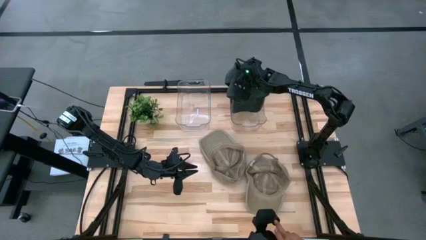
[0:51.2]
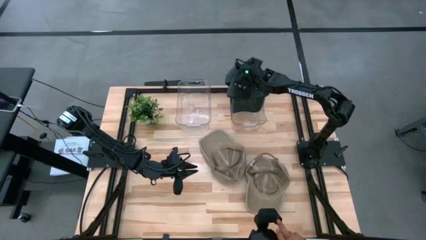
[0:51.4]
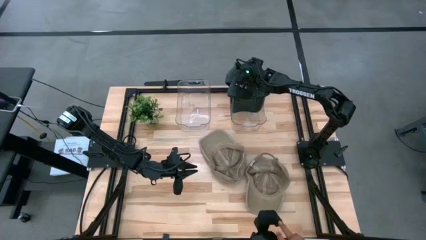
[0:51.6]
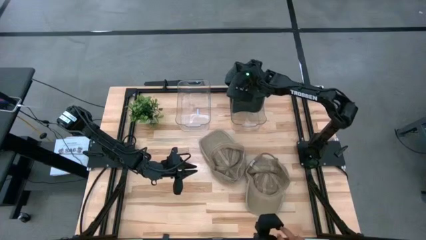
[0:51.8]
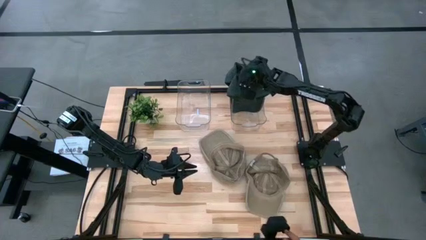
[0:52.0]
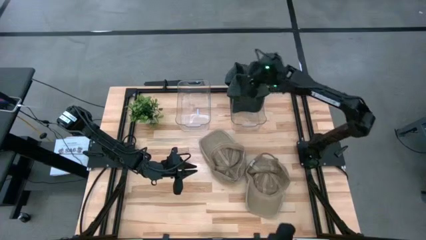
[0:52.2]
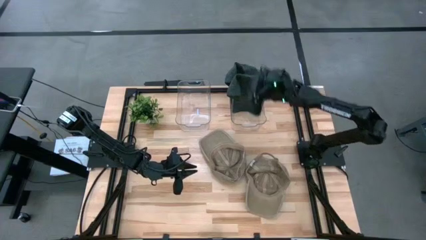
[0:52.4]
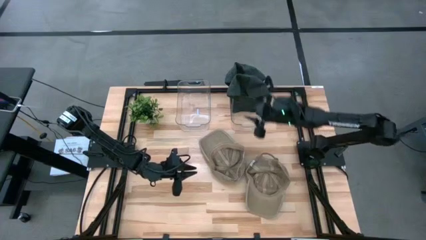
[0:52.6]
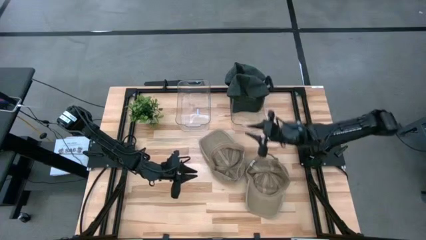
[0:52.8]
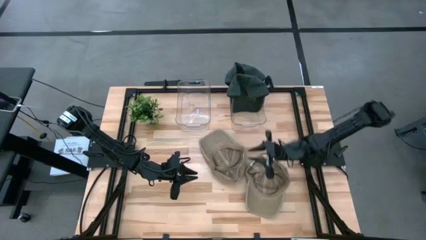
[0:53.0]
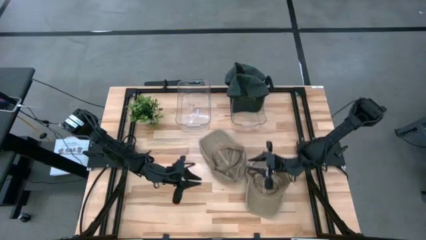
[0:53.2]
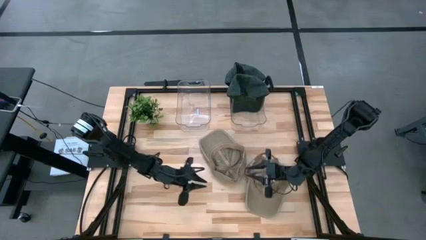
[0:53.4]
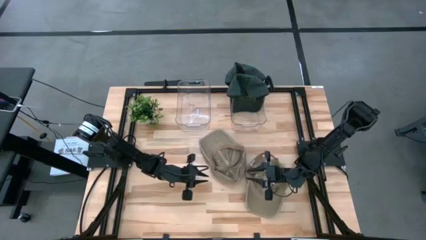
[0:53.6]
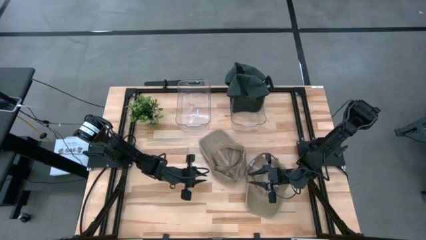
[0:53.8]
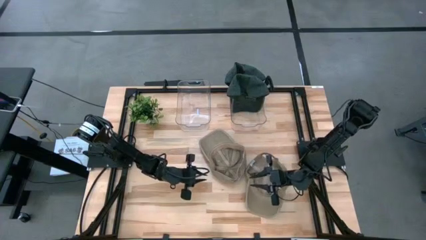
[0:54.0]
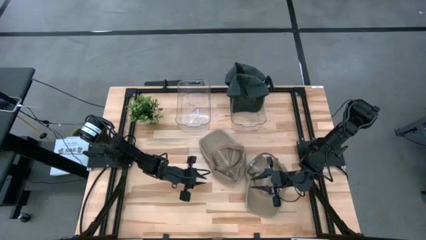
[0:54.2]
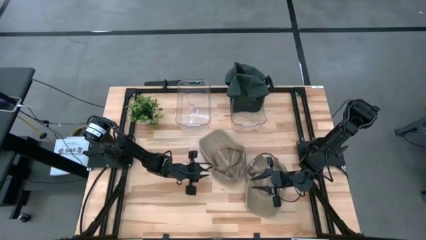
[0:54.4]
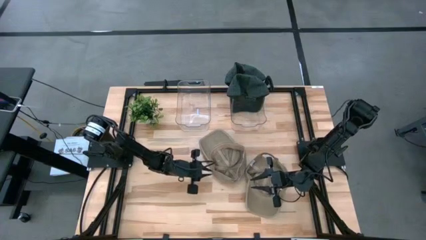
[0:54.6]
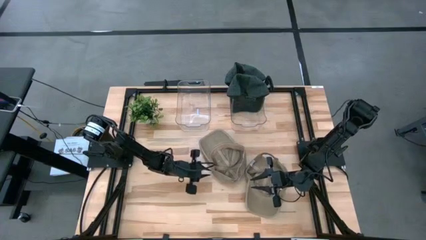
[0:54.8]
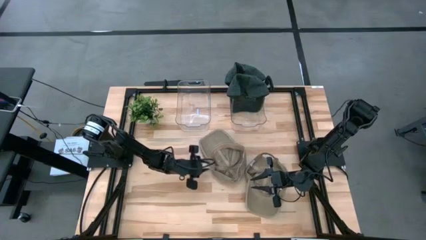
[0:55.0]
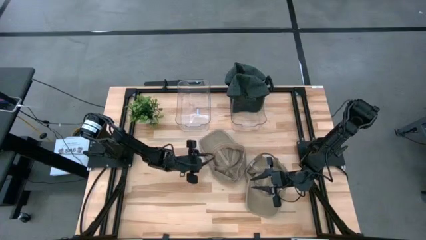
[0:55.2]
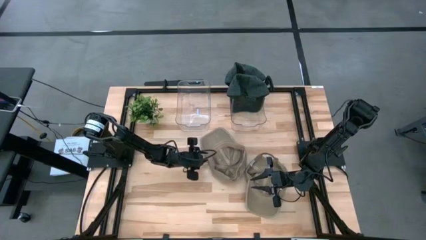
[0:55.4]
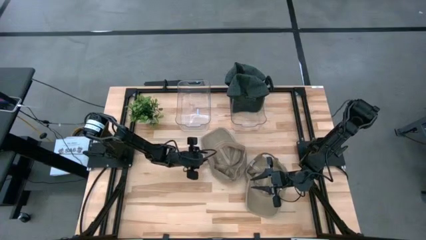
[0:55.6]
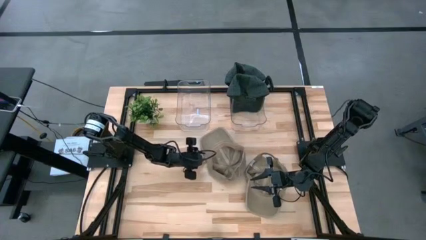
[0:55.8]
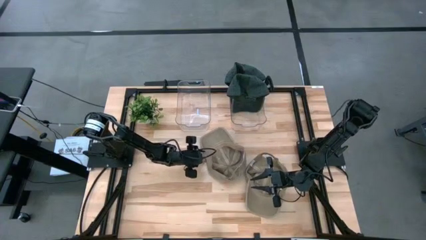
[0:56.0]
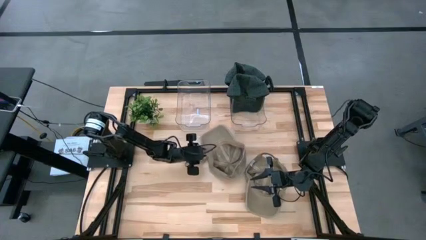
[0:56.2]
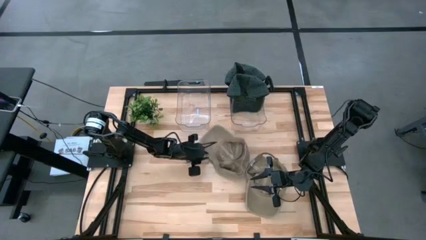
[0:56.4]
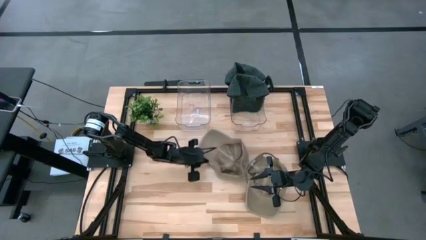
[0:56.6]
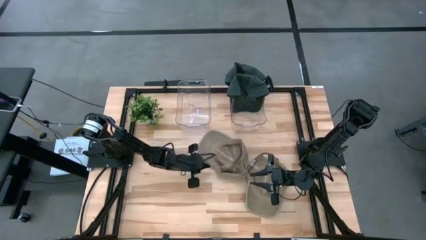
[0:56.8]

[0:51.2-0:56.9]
Task: Pick & Place hat
Put the left brown cap into the left transparent bin

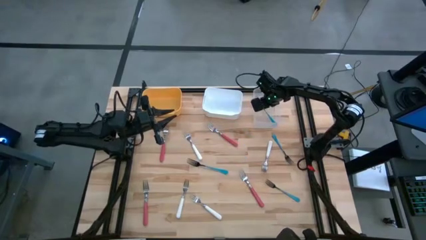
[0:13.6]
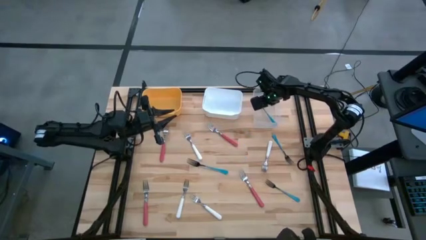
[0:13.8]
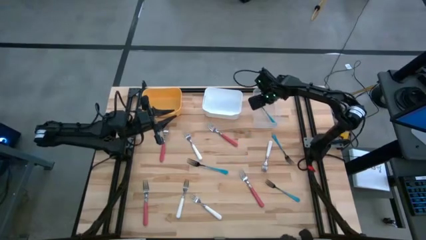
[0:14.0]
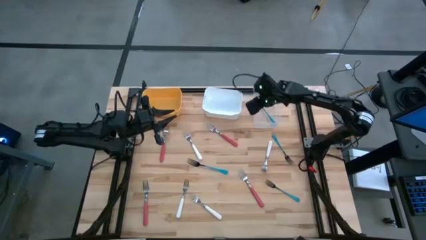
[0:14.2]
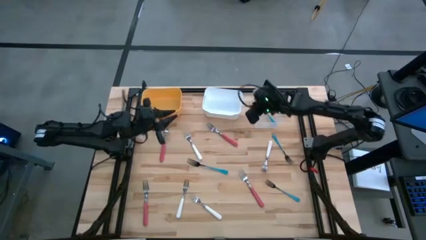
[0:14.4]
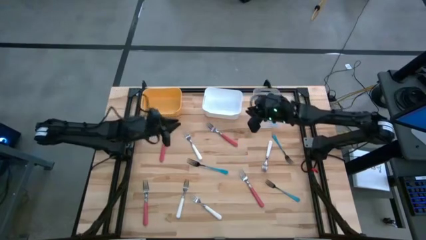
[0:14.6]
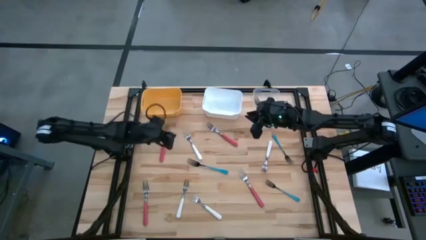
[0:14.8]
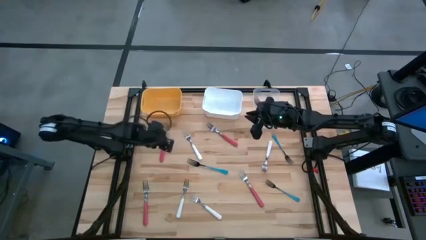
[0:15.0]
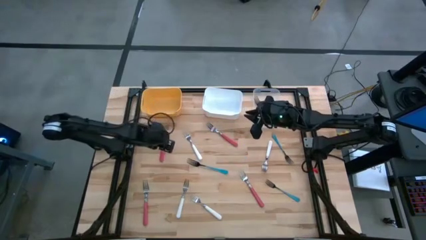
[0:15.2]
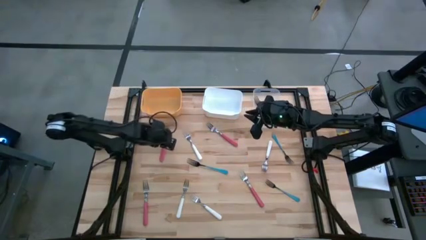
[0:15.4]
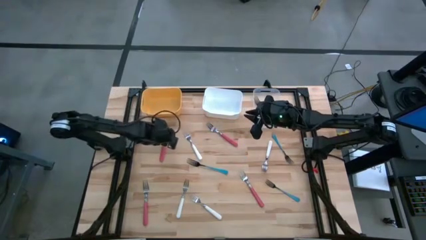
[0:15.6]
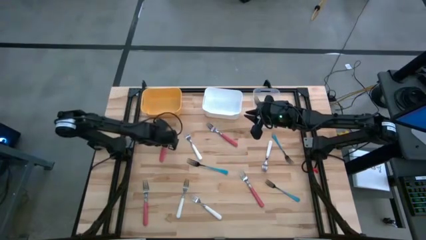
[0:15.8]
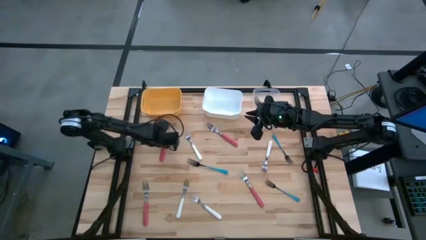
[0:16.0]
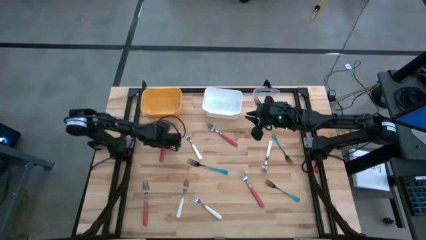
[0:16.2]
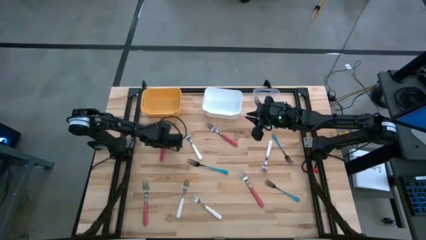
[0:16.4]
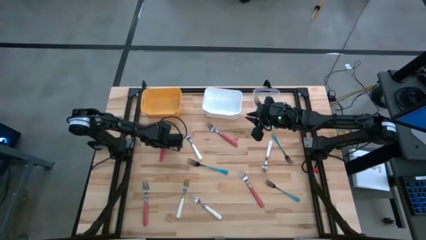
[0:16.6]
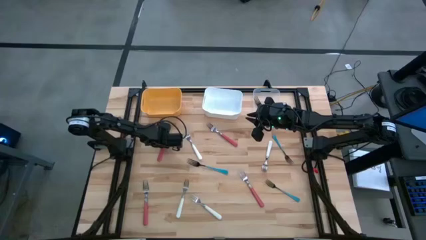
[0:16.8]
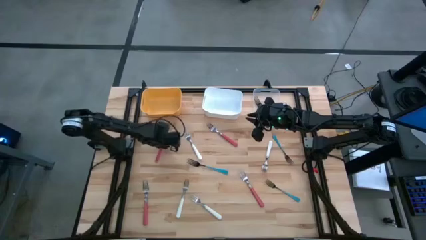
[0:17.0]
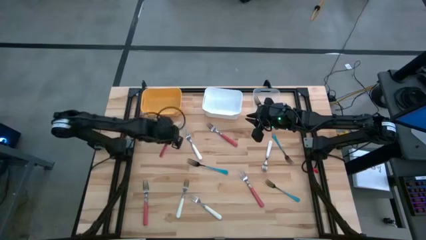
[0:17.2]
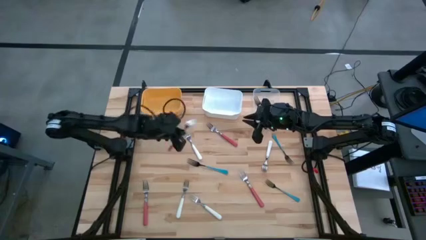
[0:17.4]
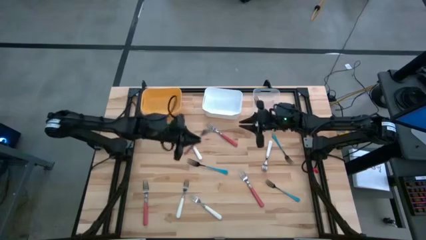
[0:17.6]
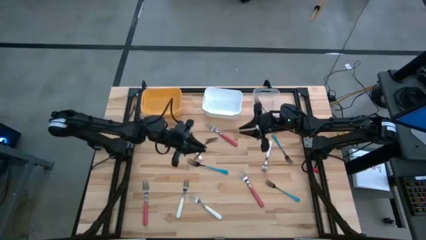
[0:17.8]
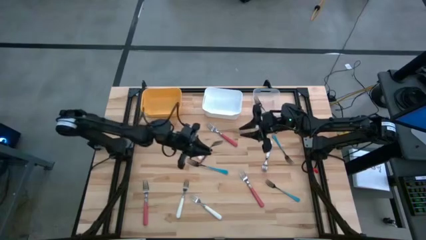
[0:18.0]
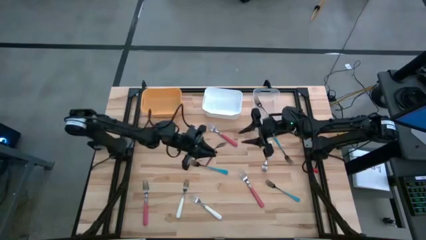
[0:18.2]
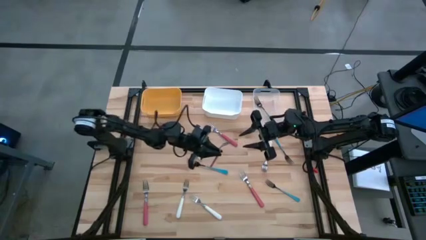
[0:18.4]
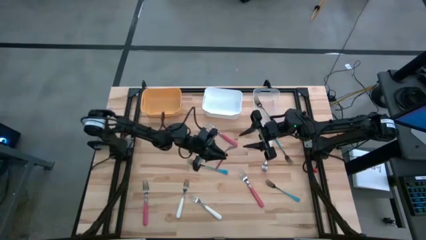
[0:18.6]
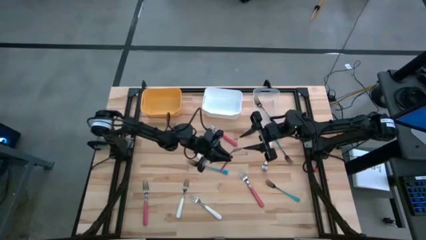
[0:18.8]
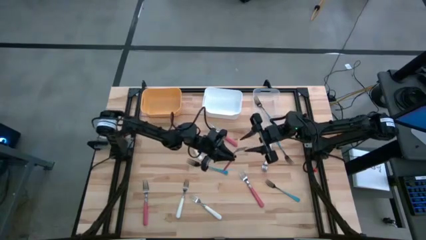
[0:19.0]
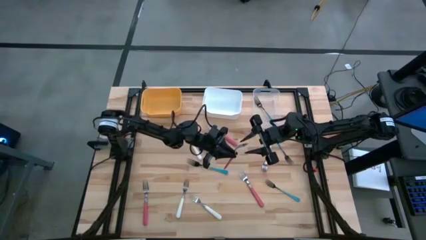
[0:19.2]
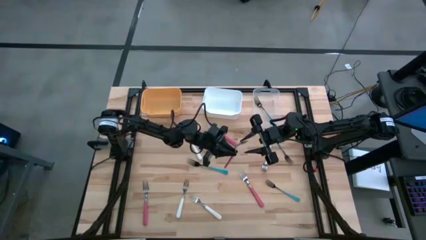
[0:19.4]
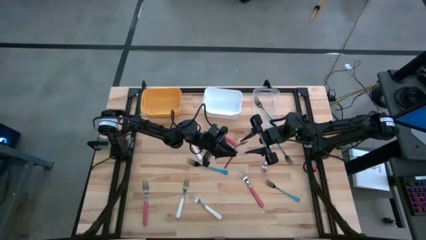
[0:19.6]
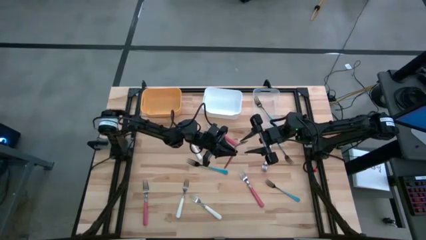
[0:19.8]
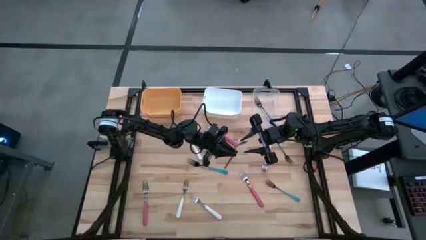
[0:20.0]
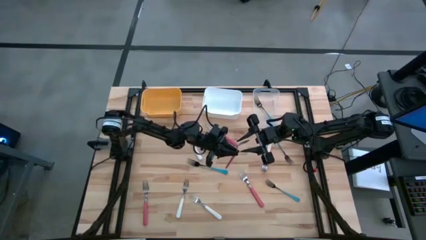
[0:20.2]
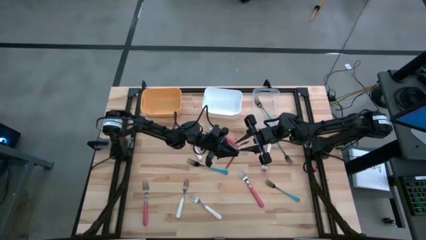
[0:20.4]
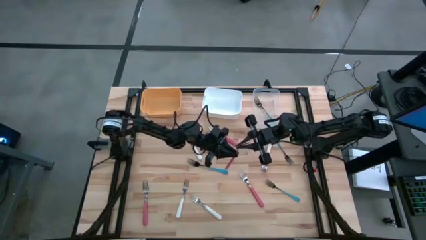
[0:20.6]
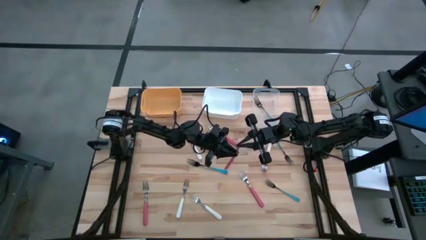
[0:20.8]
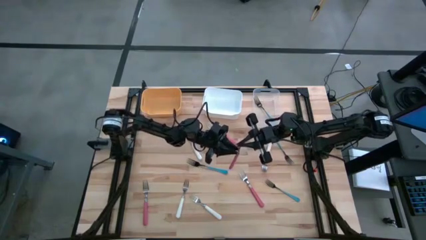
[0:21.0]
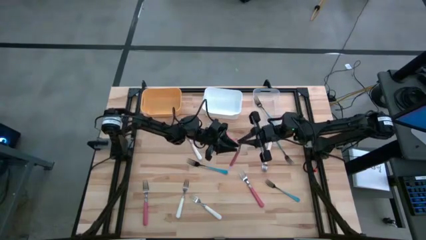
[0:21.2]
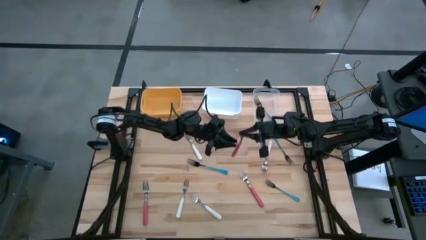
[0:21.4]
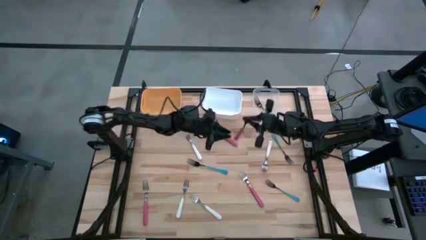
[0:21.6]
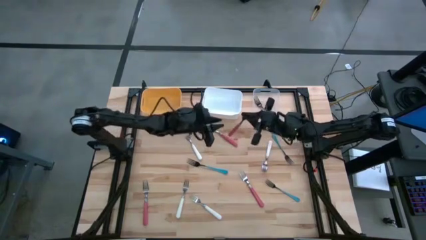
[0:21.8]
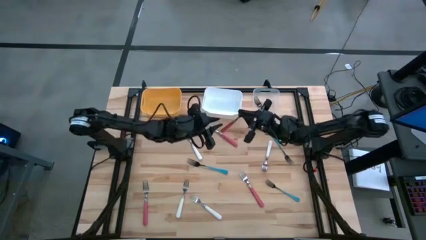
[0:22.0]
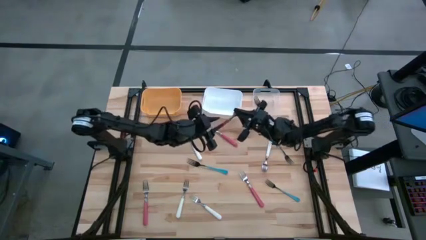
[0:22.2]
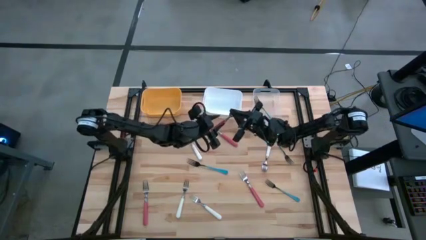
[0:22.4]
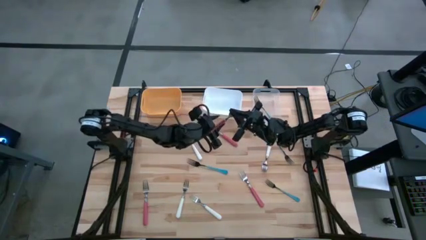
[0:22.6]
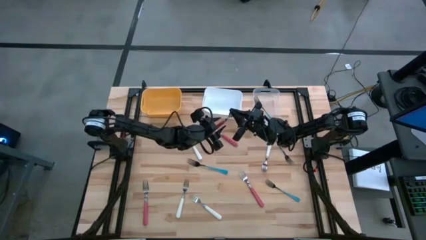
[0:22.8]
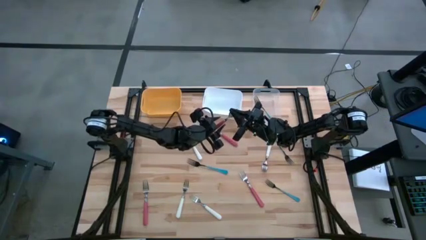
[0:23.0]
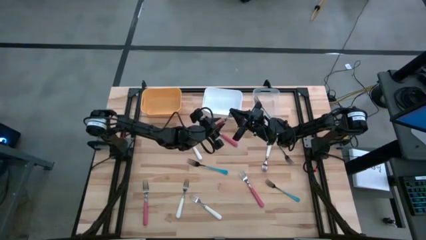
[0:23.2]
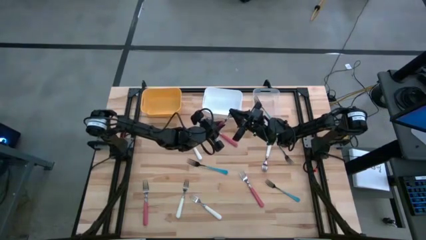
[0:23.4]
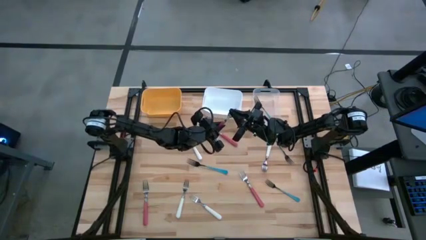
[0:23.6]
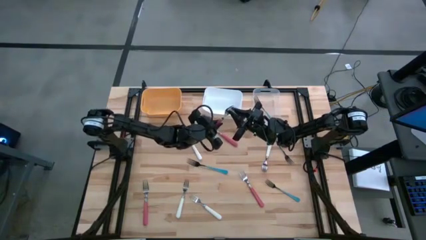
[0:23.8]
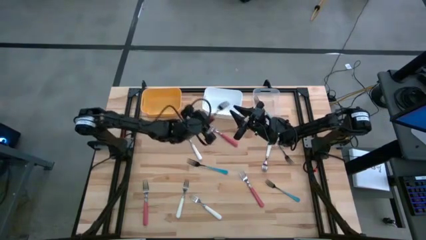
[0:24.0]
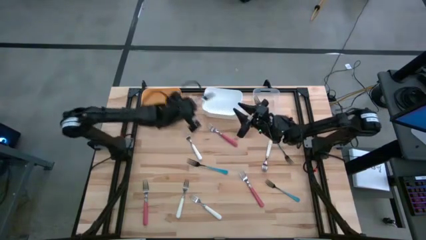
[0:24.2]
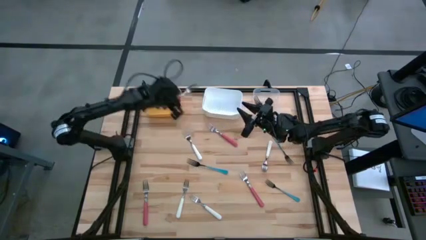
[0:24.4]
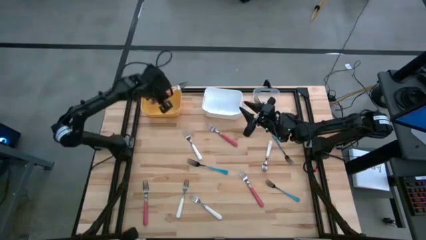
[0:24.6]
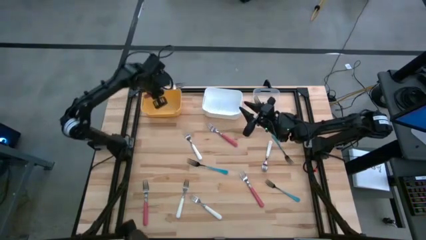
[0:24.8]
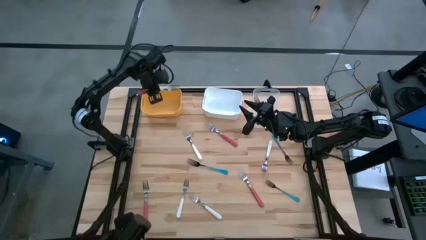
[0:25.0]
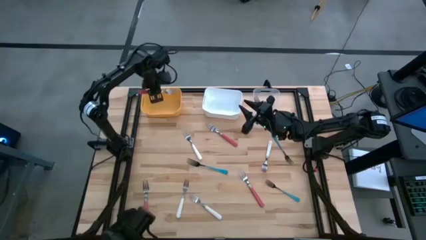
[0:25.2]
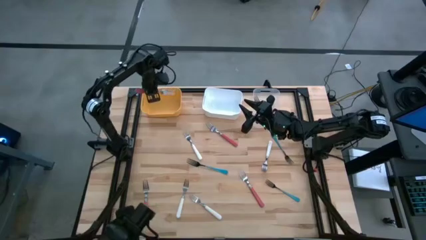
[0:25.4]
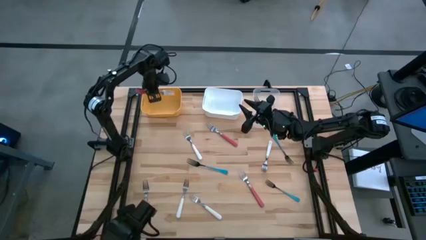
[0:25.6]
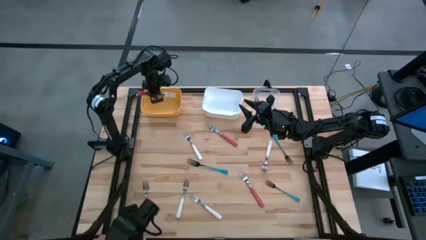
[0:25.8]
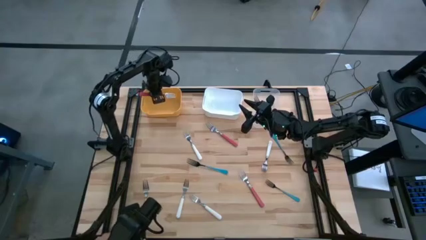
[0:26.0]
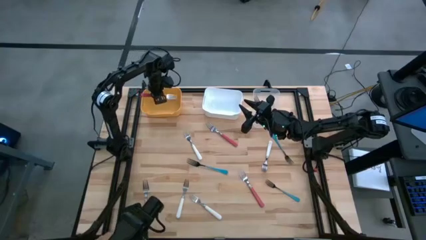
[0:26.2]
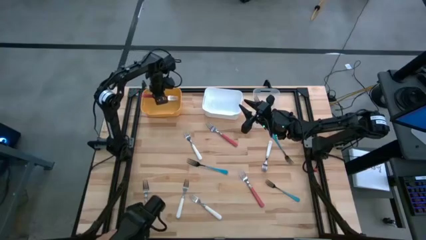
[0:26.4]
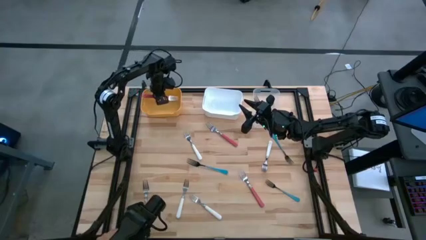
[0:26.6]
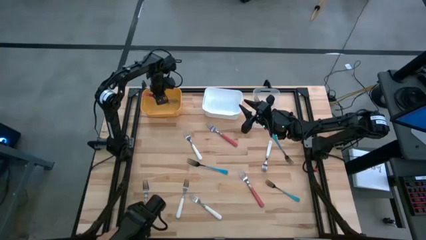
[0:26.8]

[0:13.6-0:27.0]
Task: Sort silverware by color (type)
Put the pink fork into the yellow bin
